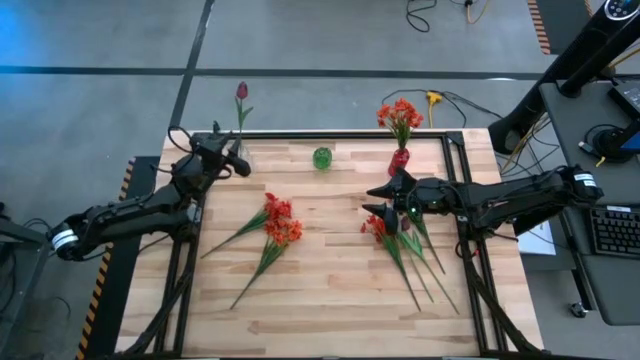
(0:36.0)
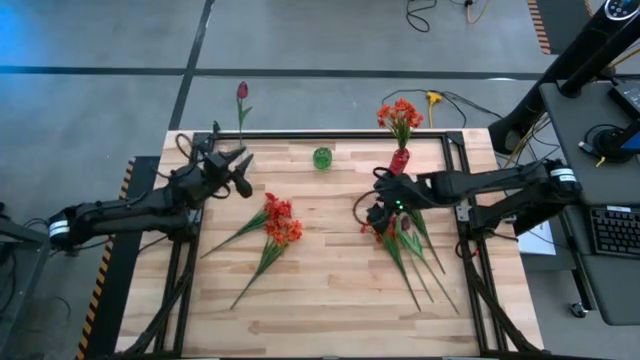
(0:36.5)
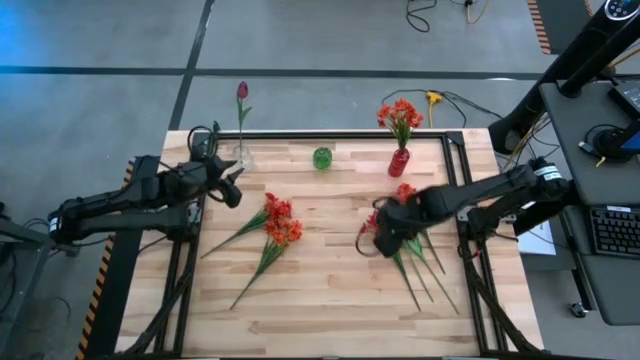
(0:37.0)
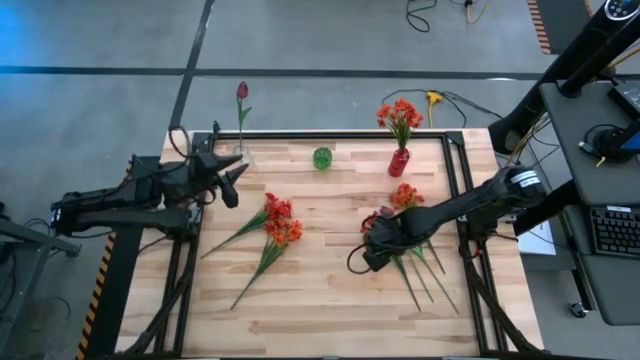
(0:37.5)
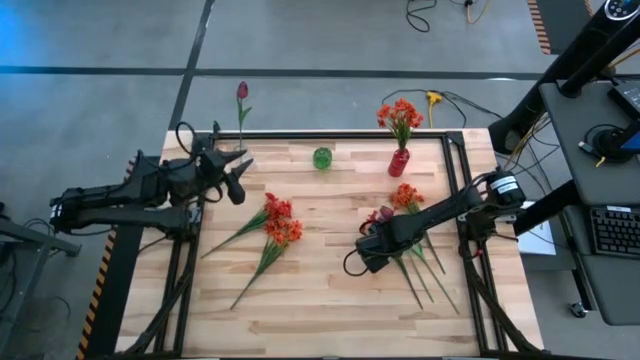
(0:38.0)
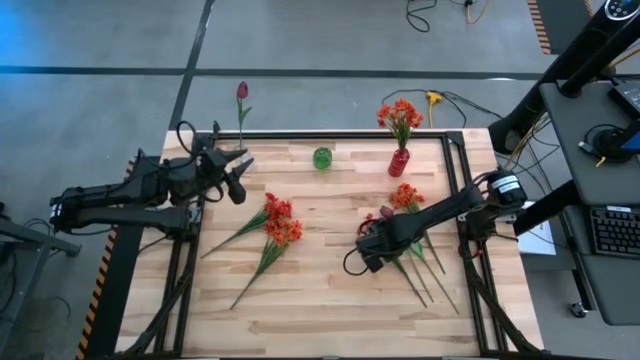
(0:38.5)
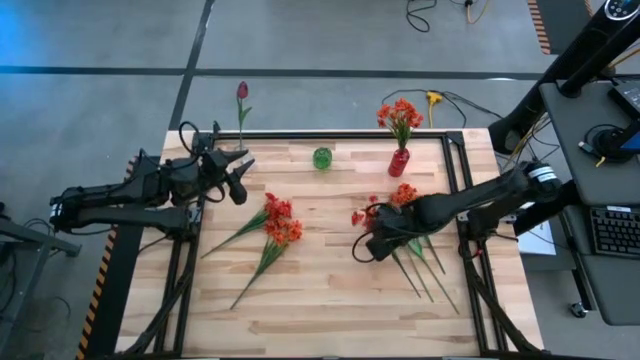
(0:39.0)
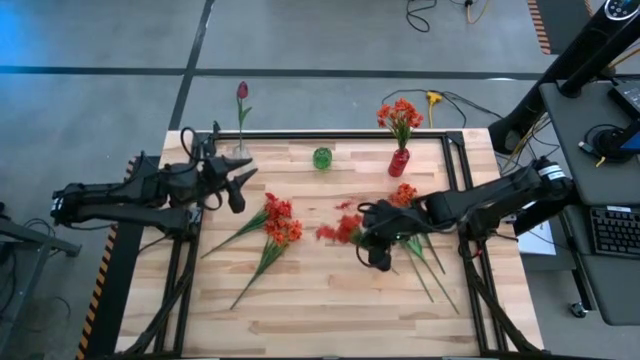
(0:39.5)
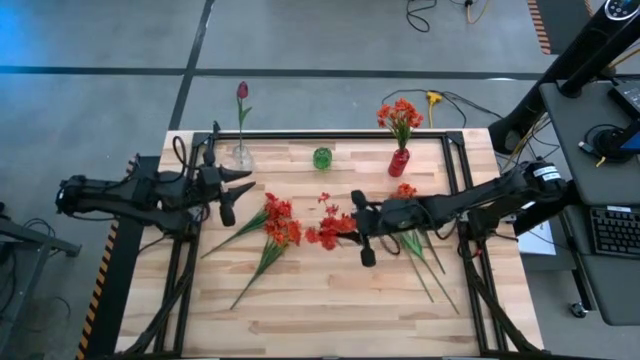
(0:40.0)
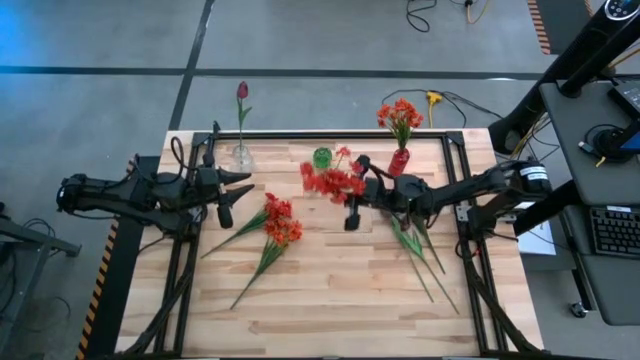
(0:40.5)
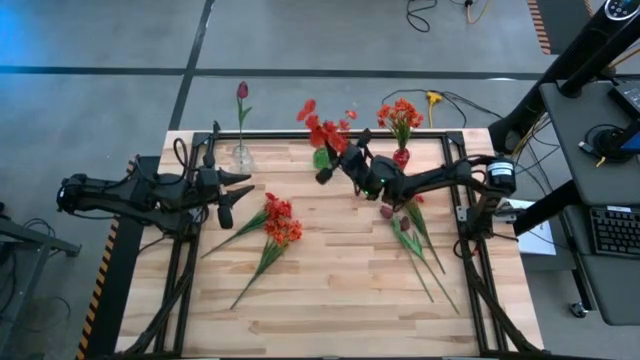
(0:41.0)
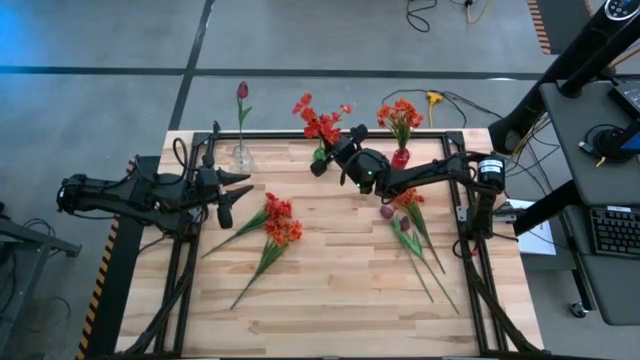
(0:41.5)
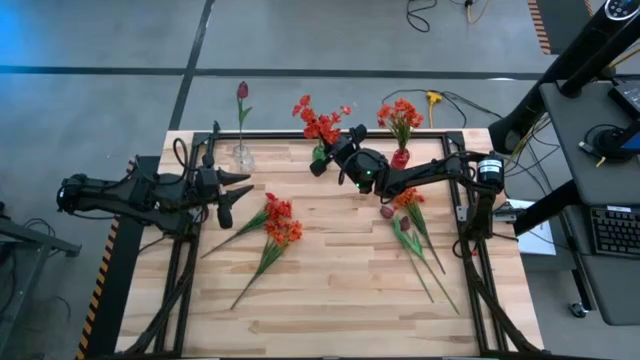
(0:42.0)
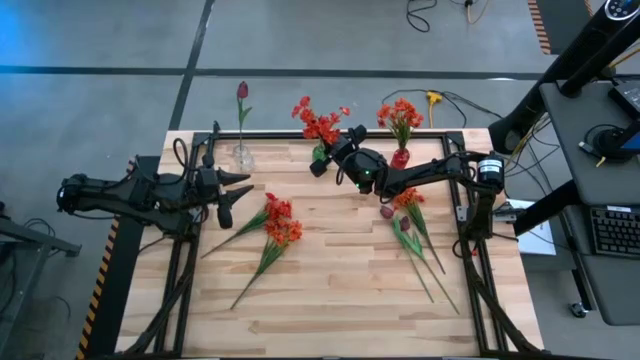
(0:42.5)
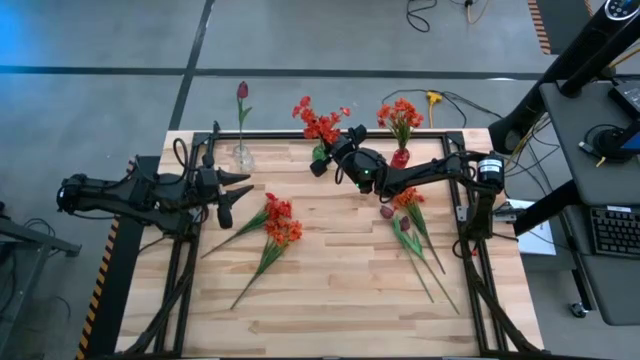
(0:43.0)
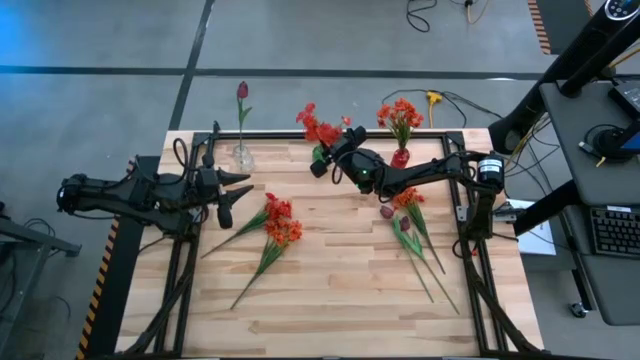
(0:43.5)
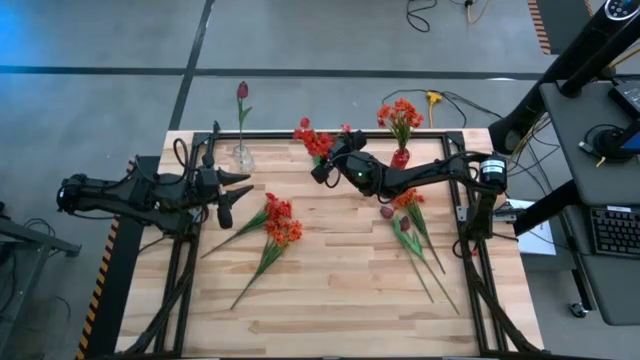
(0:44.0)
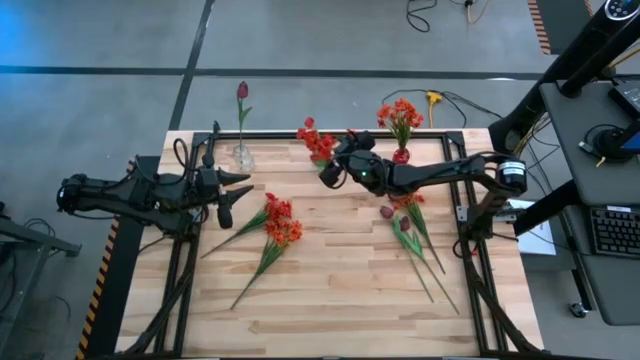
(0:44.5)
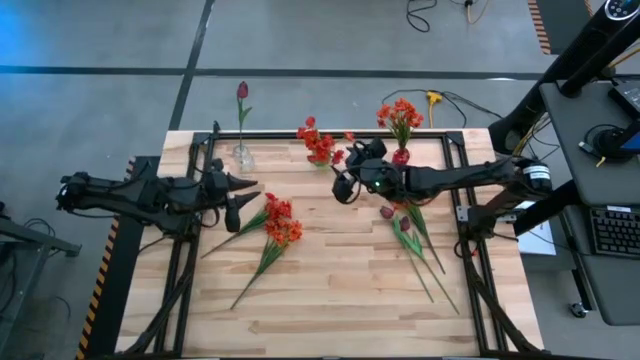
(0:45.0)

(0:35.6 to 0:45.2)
Task: Sort flowers into vase by color
Put the right red flower into the green vase
